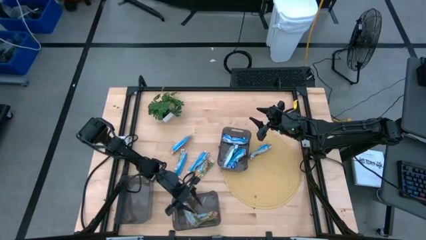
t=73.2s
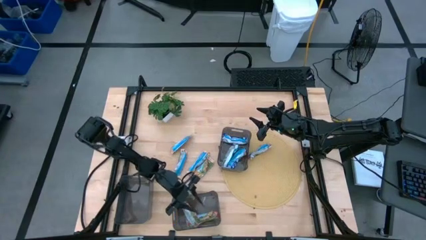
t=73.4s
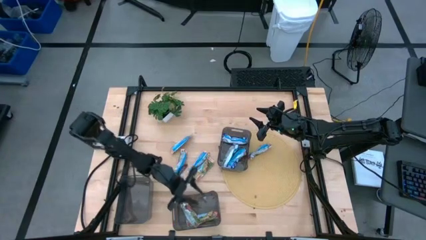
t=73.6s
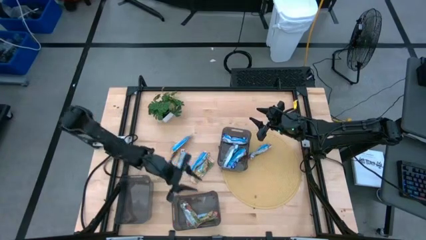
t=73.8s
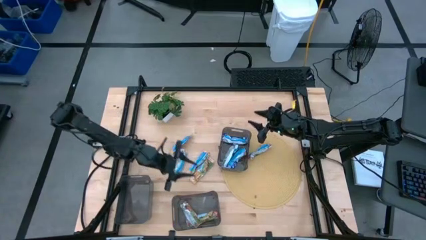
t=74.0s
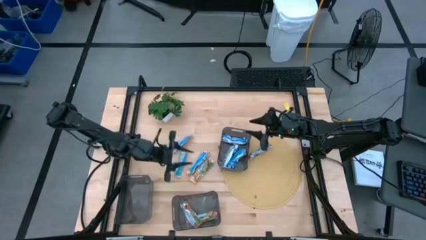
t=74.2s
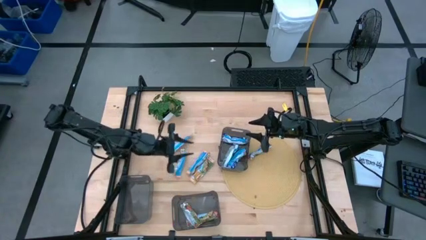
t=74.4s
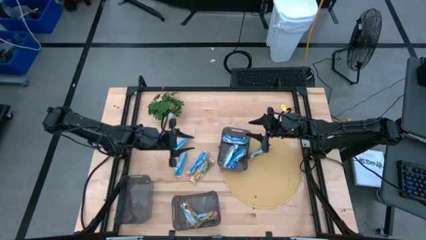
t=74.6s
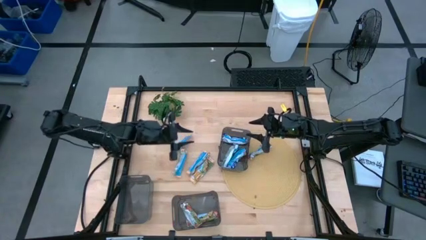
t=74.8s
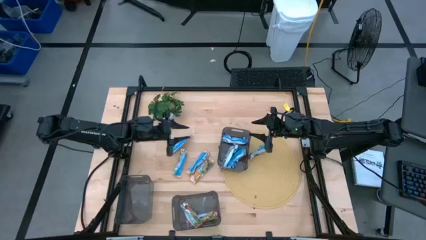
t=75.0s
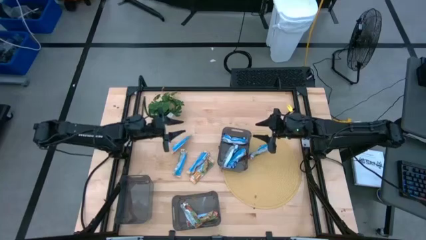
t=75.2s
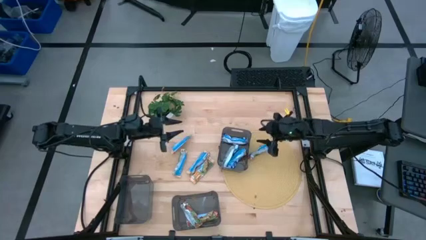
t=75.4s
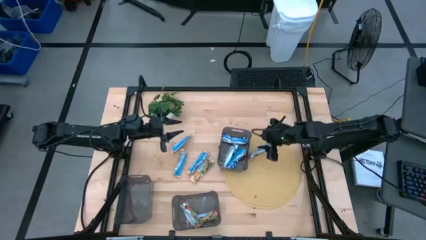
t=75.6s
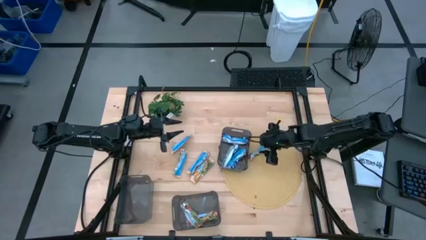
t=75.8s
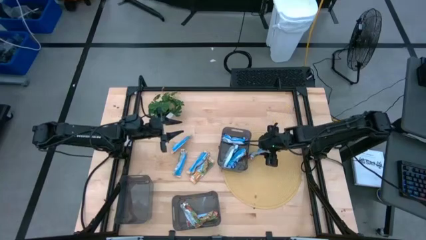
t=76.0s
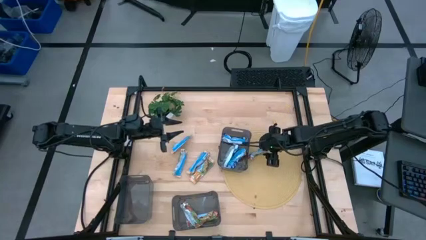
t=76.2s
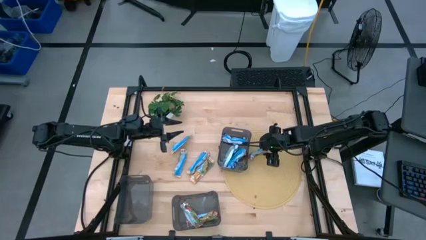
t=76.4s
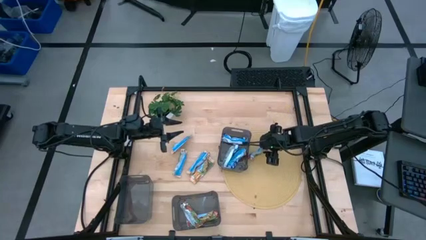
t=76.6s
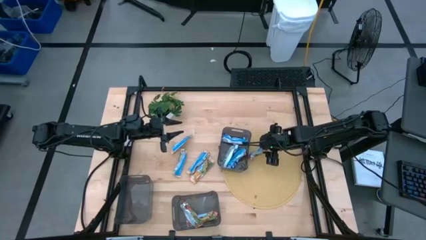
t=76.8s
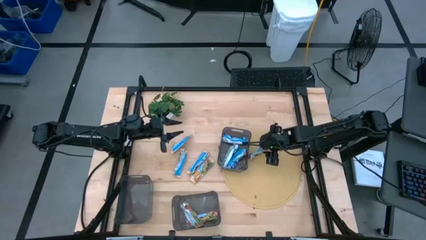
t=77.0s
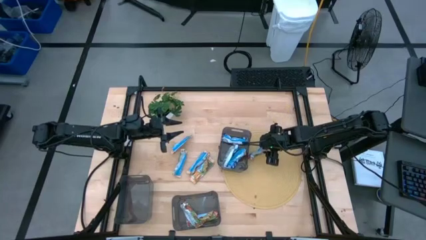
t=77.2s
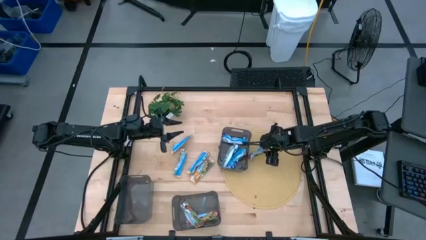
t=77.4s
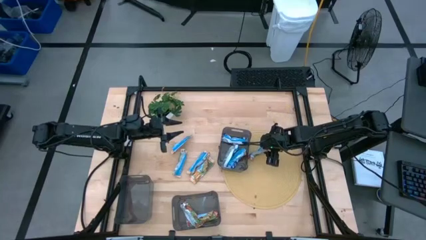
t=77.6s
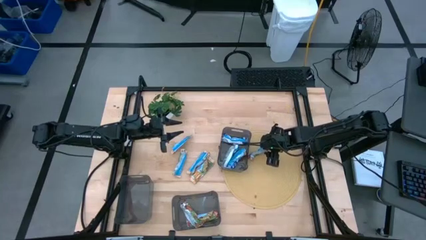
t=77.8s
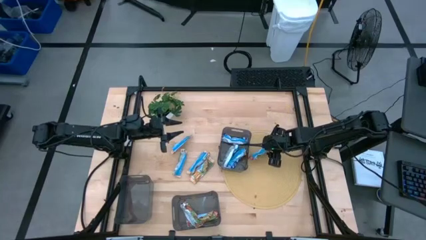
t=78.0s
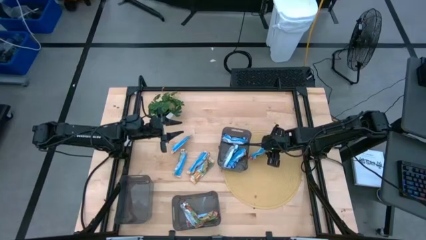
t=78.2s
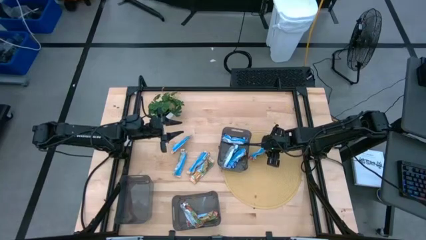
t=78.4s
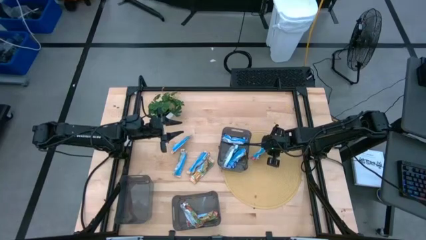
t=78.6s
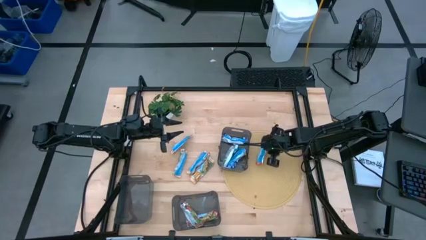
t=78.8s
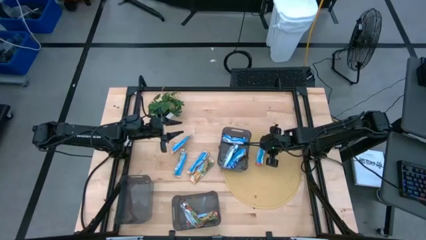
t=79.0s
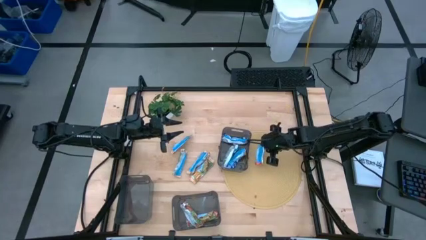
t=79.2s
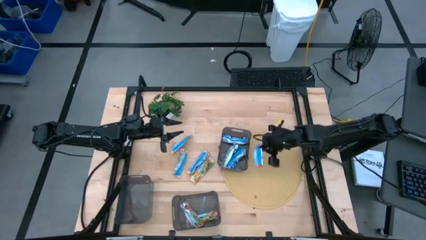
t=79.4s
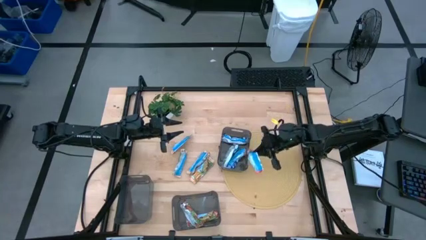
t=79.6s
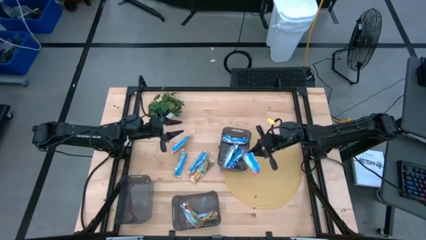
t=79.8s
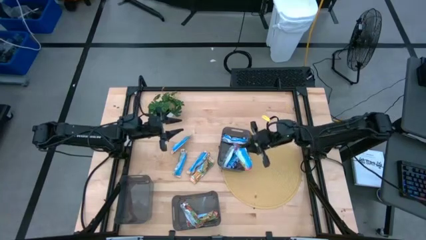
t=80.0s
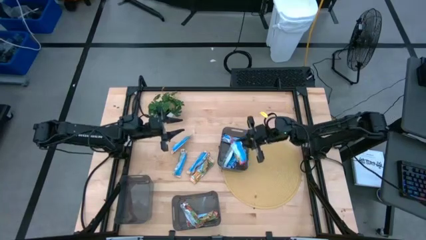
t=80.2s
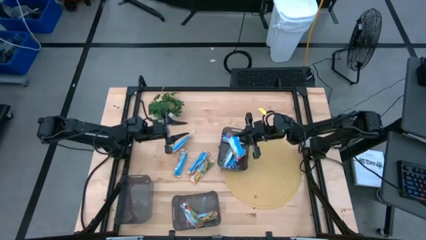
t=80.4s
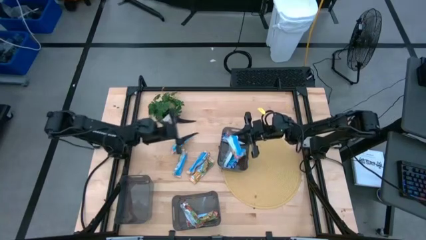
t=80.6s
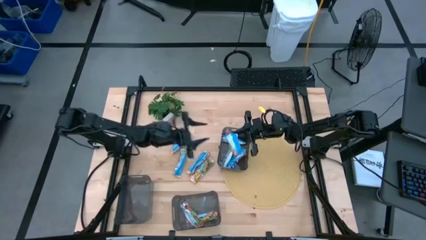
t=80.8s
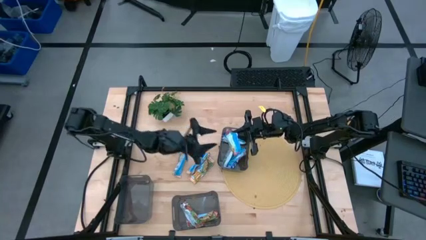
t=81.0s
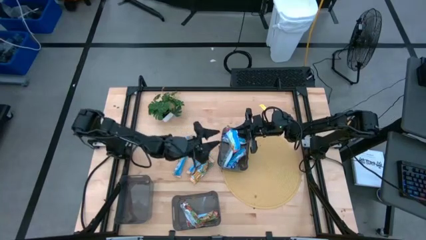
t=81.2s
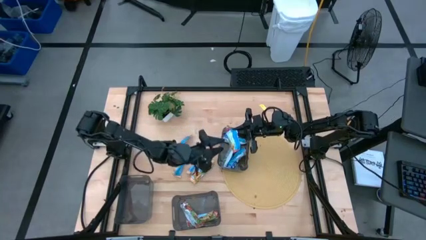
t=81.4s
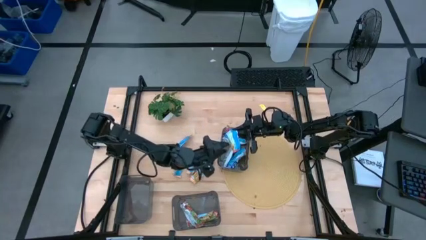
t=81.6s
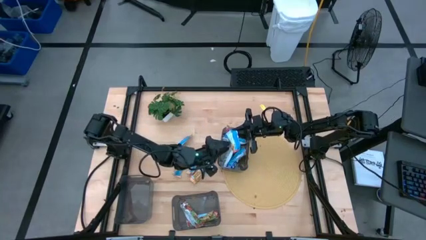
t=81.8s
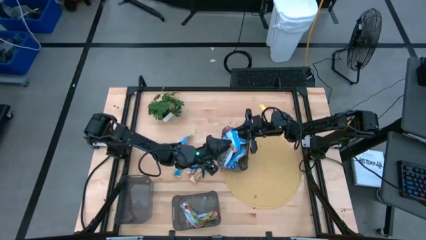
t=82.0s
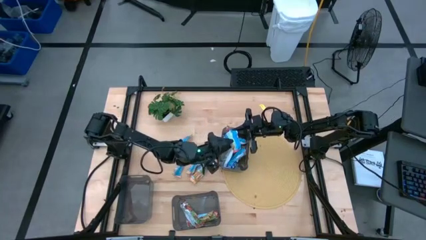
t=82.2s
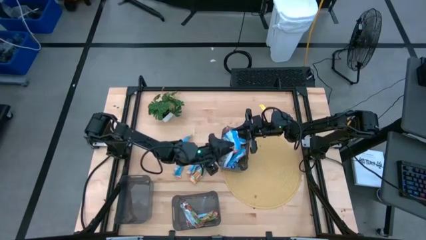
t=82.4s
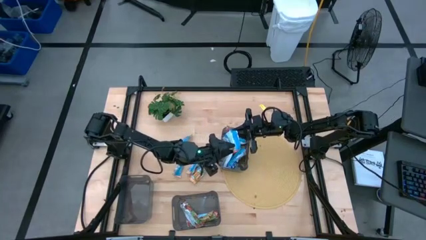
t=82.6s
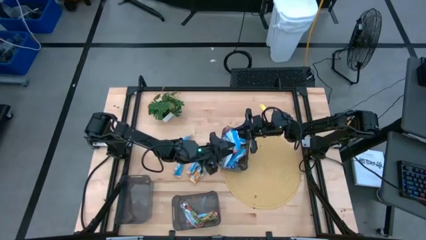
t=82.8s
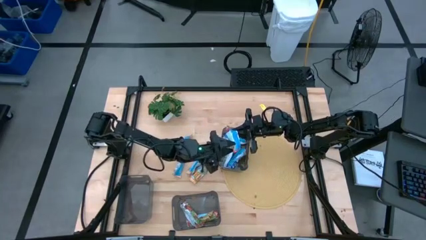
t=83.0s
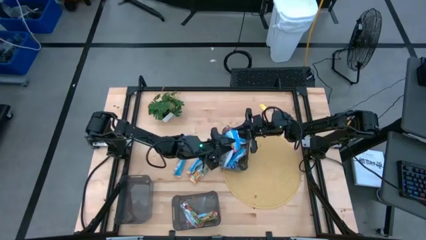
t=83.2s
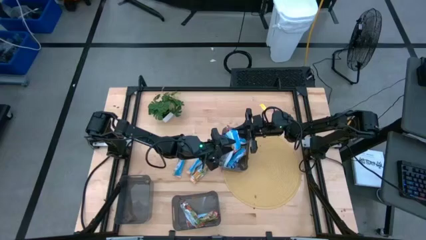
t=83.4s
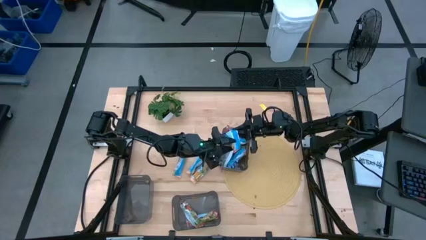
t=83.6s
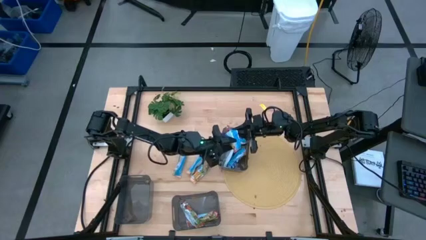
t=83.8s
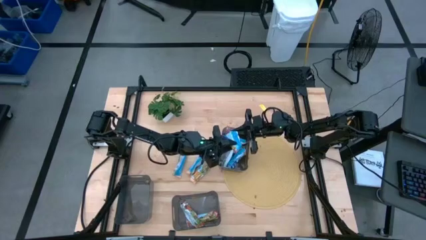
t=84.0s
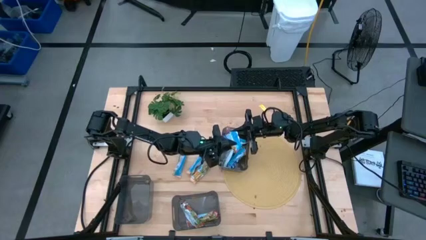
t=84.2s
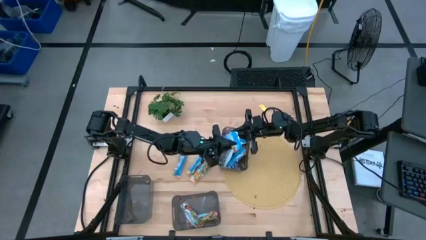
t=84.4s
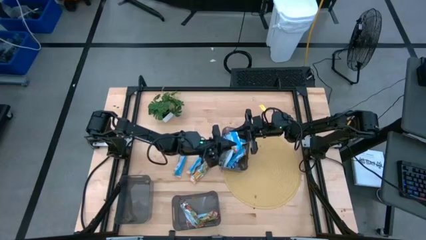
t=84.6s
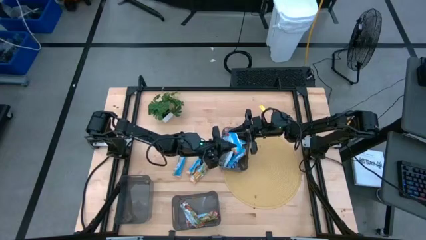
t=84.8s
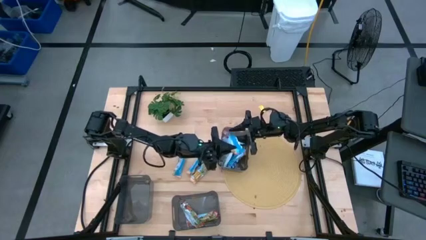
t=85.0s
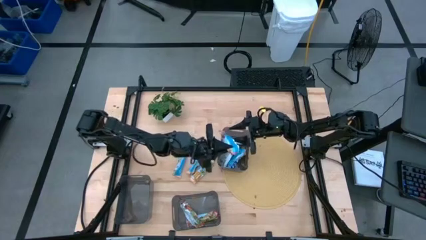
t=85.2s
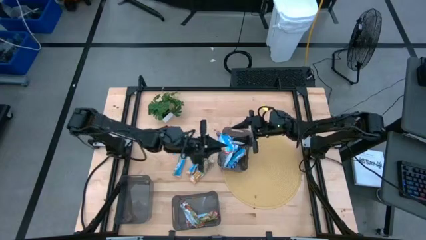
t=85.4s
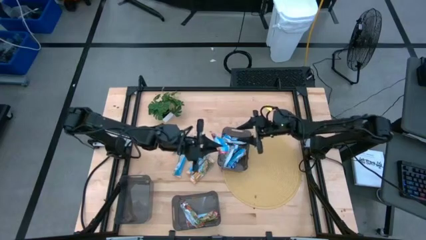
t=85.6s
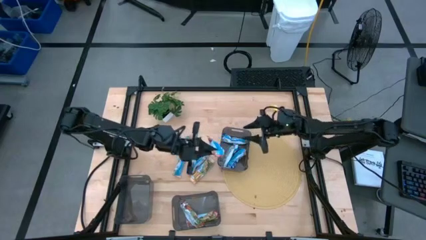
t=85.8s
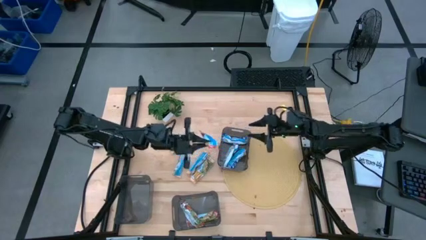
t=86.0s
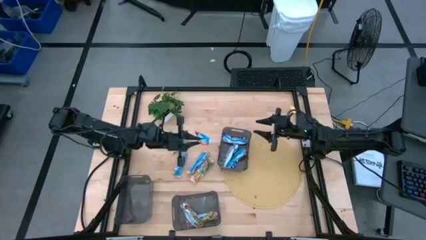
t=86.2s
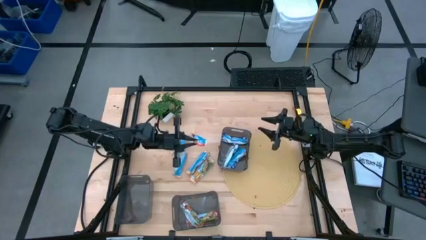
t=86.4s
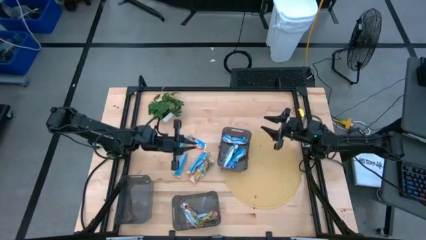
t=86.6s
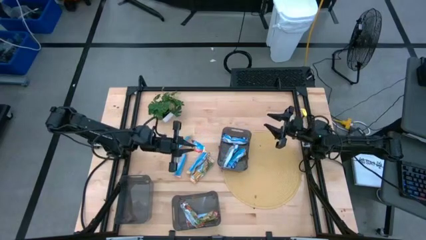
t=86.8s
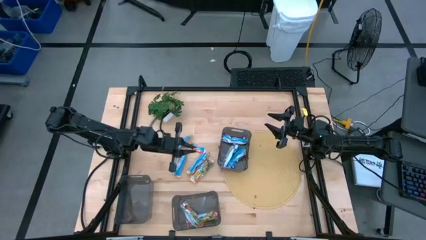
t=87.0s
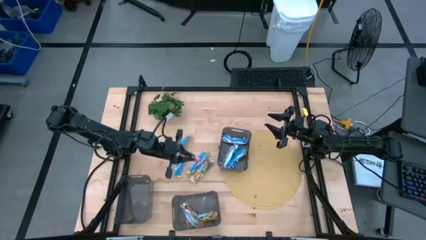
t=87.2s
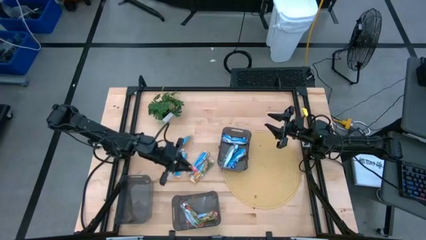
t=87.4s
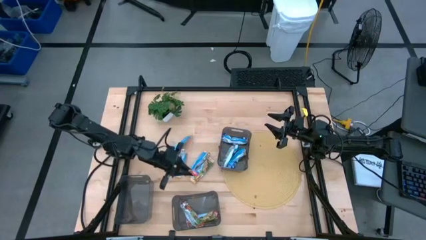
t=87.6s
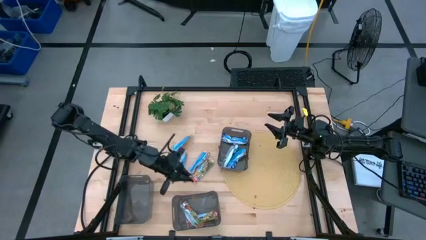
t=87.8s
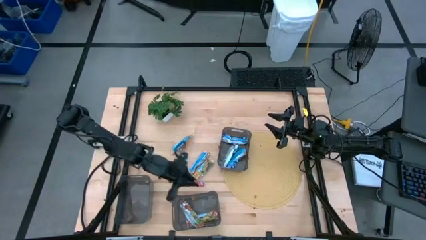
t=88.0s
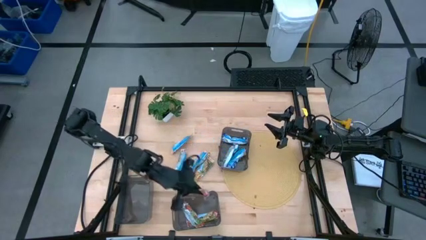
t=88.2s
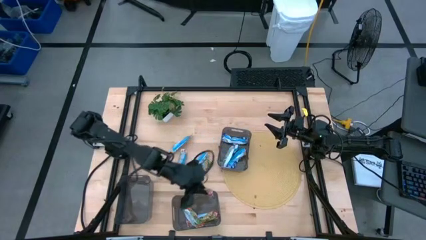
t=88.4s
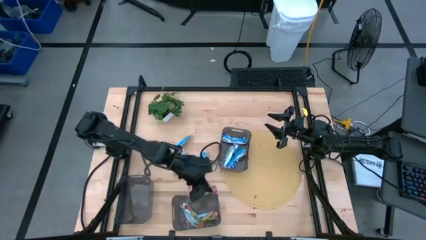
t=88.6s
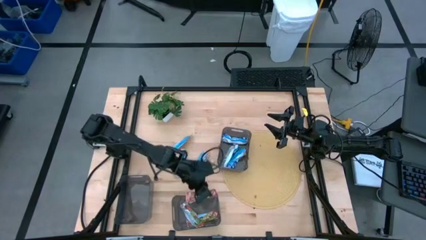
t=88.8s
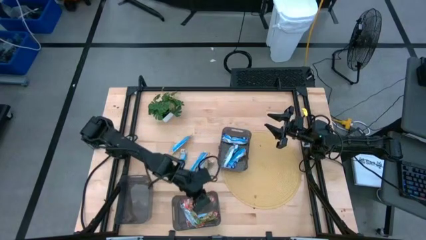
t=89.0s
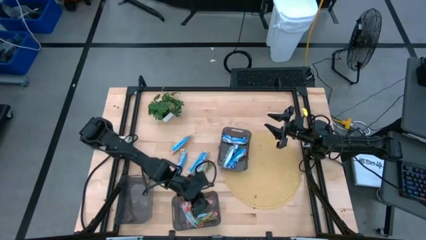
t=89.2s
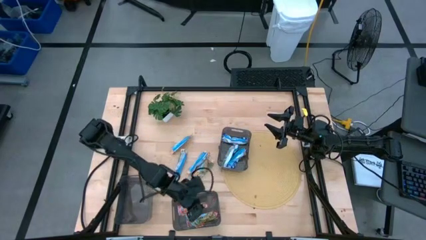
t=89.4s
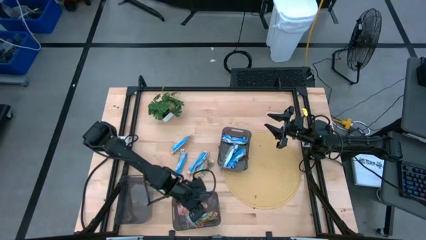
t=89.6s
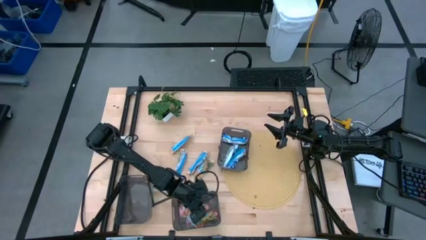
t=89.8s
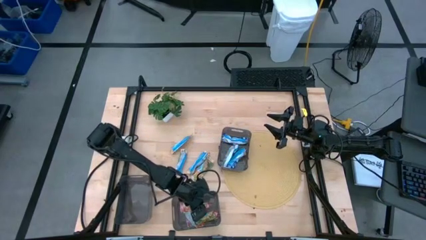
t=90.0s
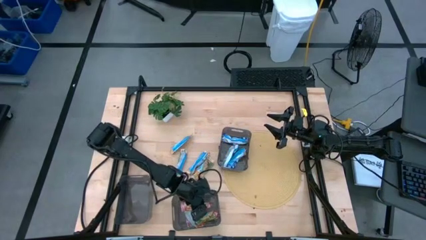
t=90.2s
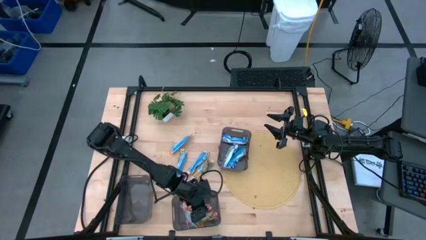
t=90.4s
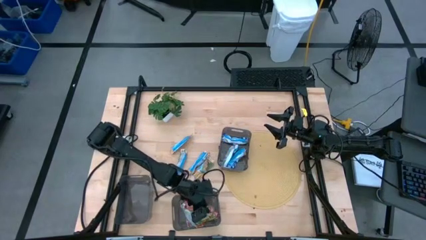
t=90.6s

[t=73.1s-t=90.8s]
Task: Pick and place Granola Bars by type
Put the red granola bar into the bottom right black bin
